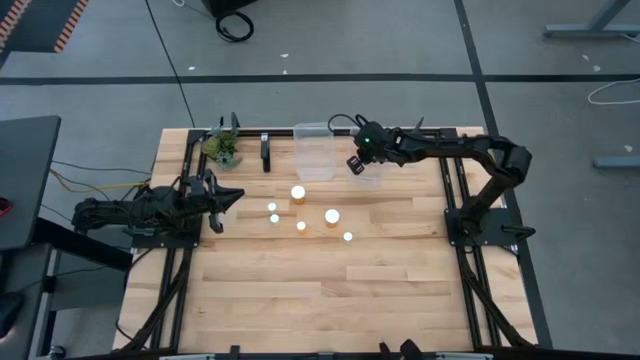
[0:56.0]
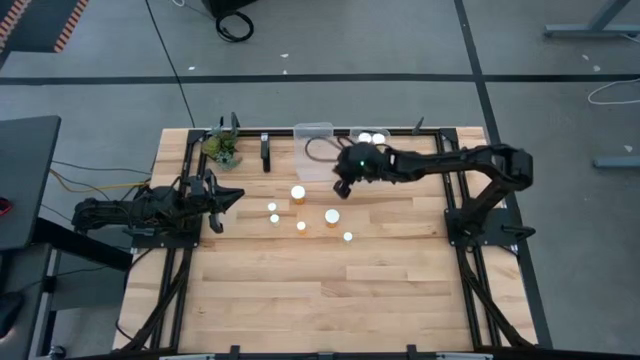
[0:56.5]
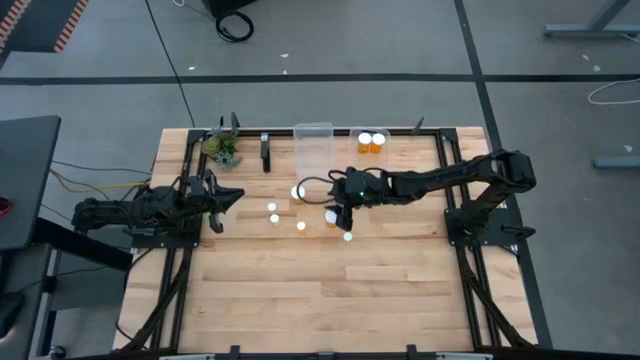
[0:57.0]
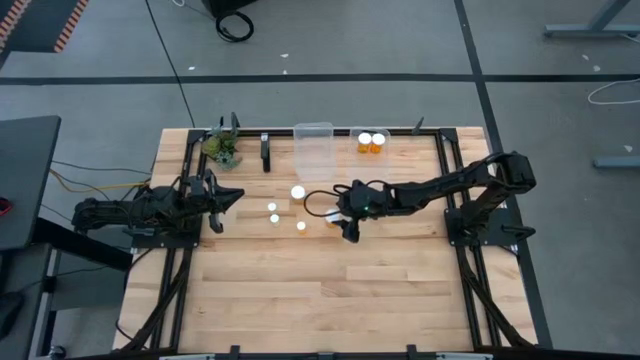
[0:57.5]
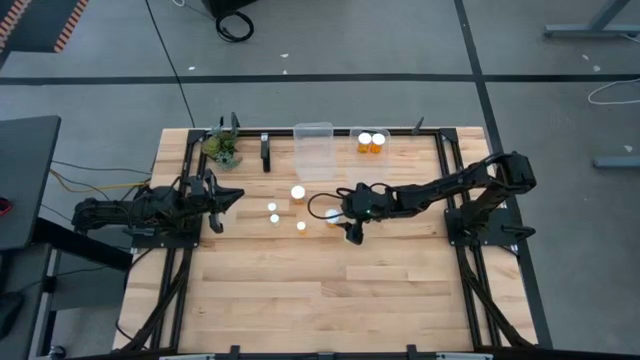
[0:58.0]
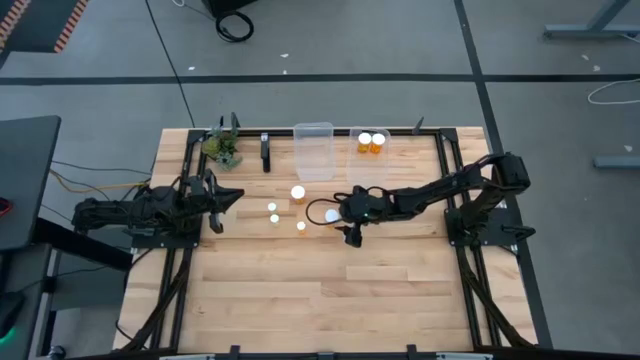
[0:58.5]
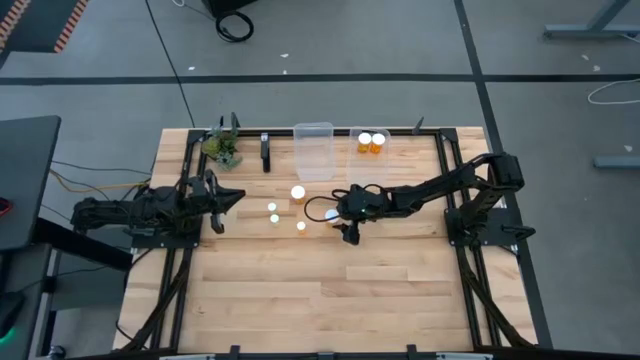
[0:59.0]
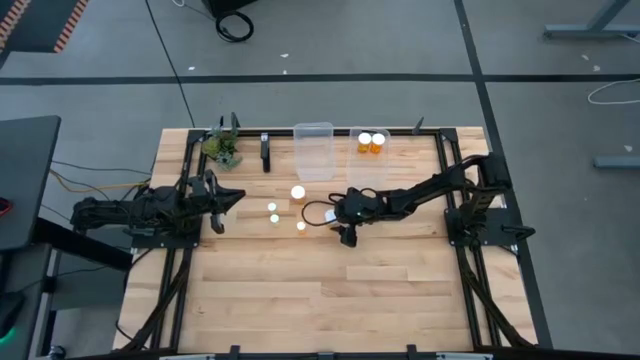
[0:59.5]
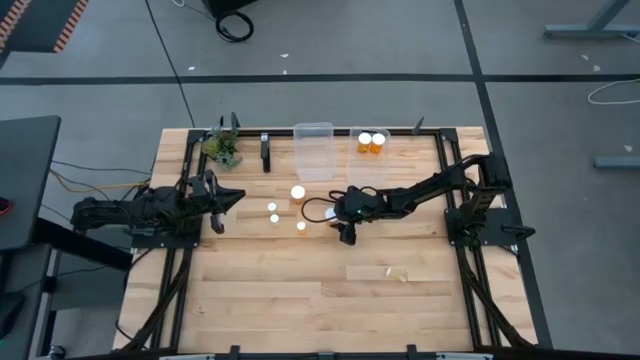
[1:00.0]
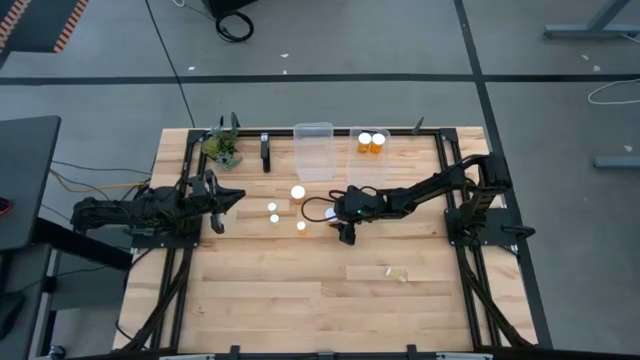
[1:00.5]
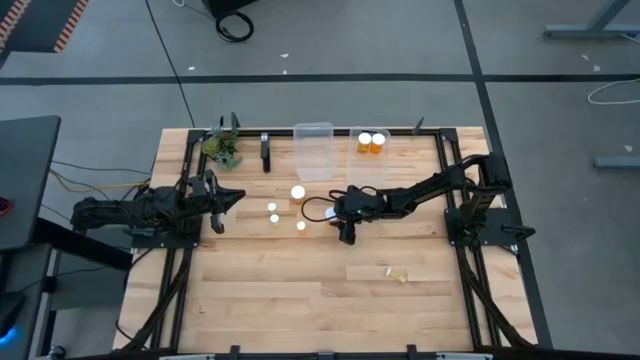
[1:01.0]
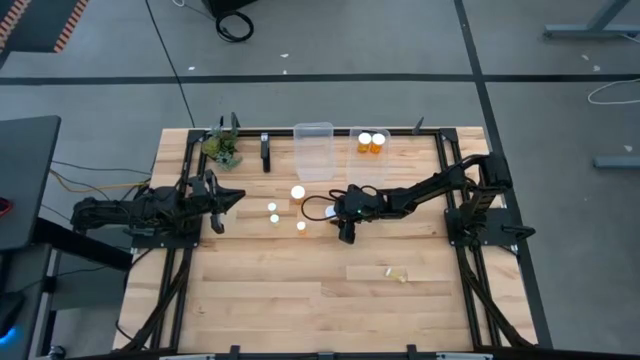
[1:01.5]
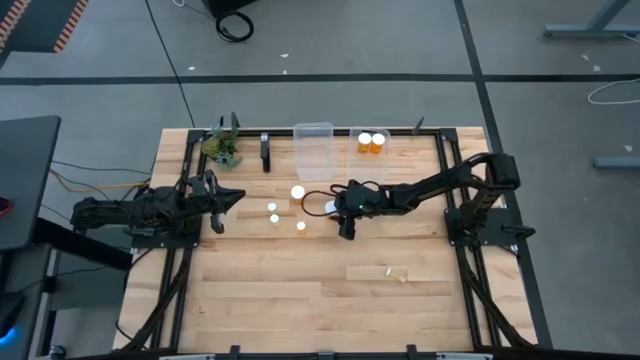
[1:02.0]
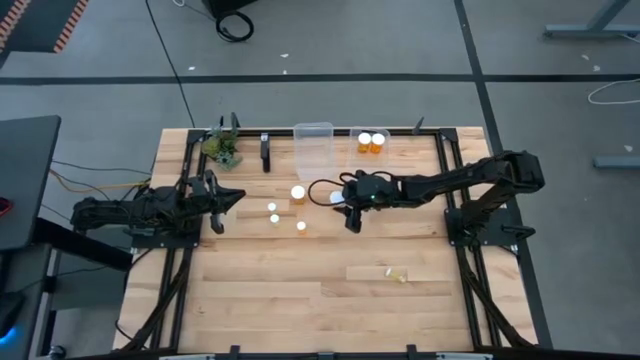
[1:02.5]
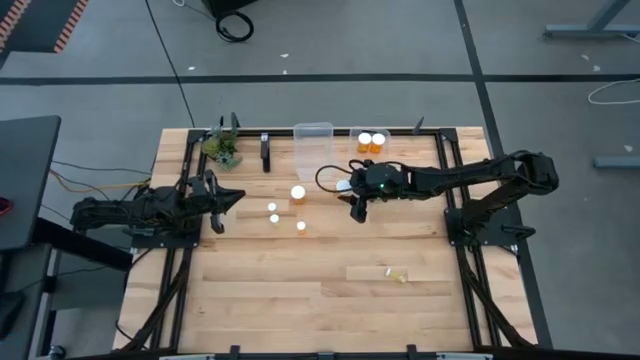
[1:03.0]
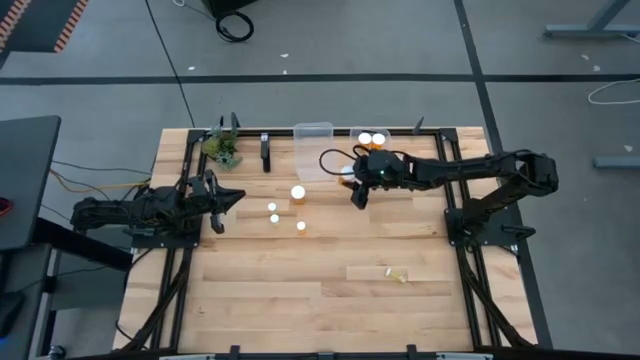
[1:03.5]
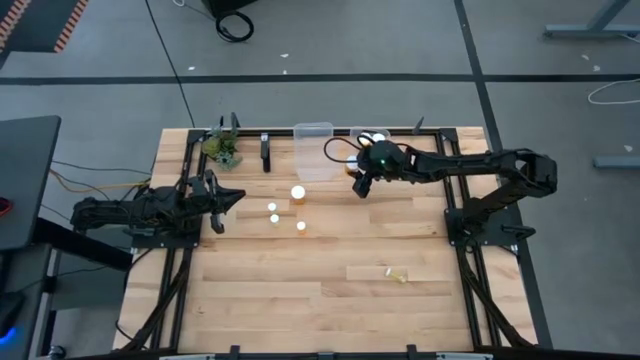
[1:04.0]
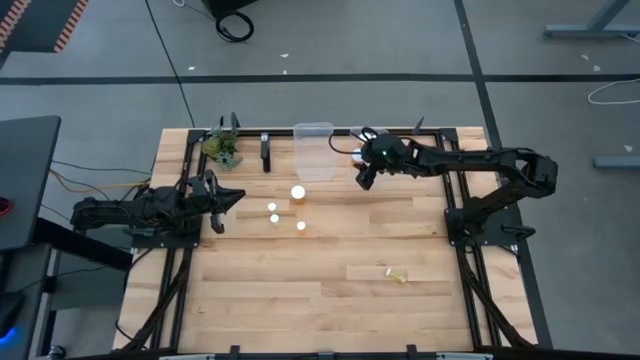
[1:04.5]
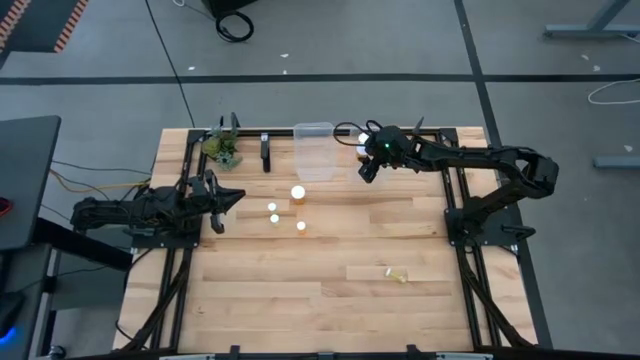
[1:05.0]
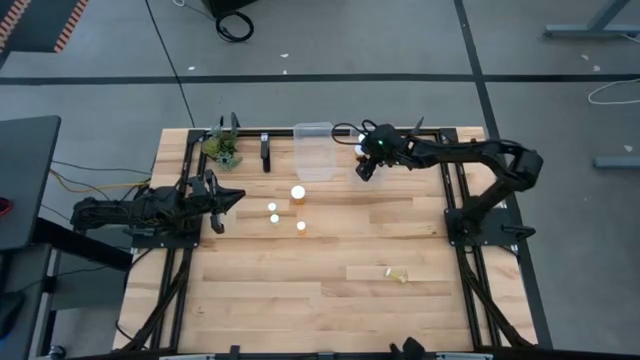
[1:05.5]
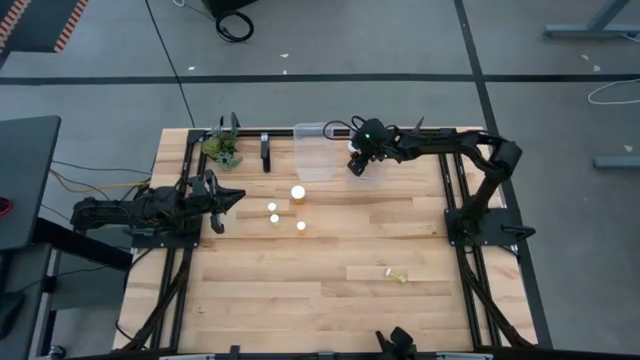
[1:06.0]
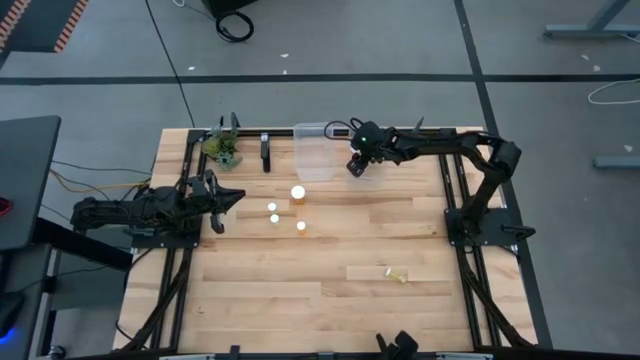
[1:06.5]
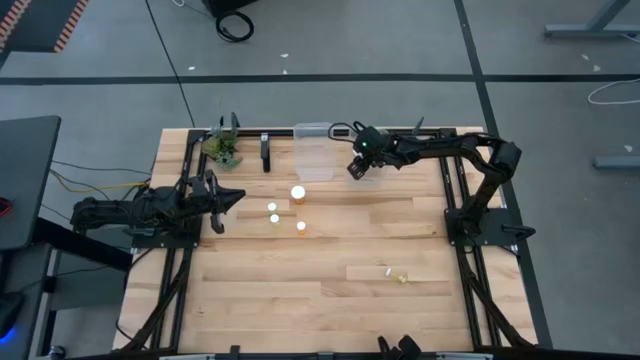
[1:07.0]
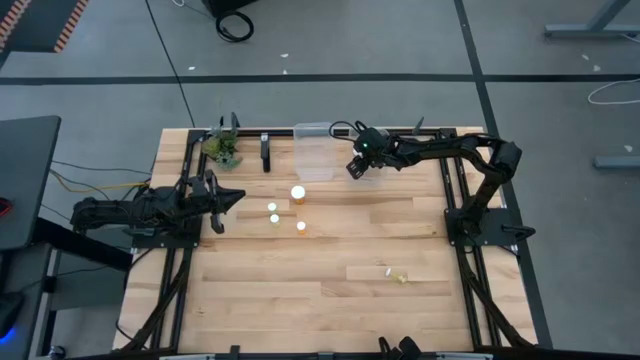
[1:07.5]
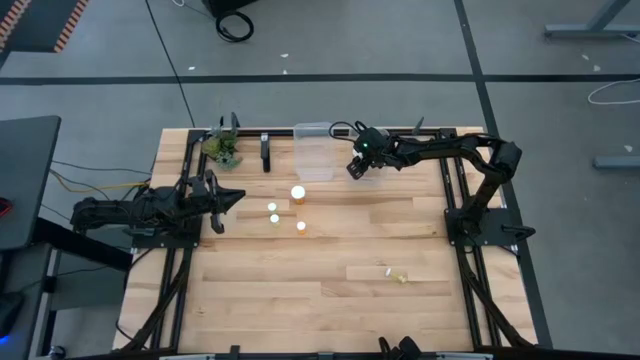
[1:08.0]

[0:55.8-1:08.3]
Task: Pick and place medicine bottles into bin by pill shape (circle, oval)
Put the bottom big orange pill into the right transparent bin

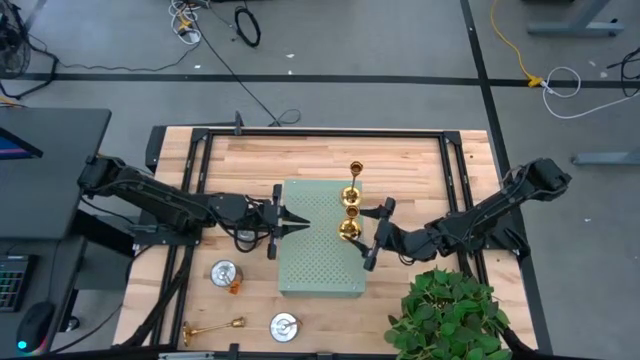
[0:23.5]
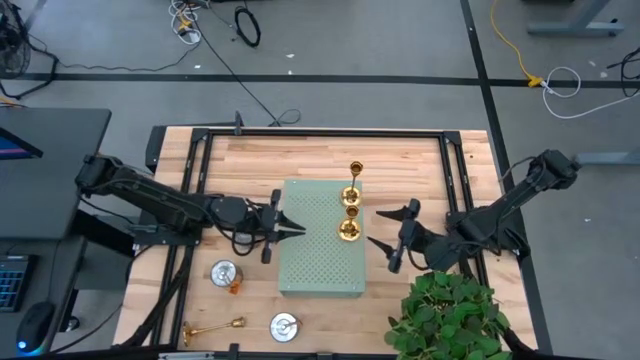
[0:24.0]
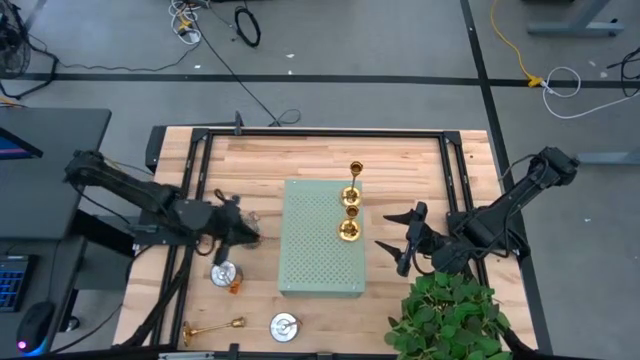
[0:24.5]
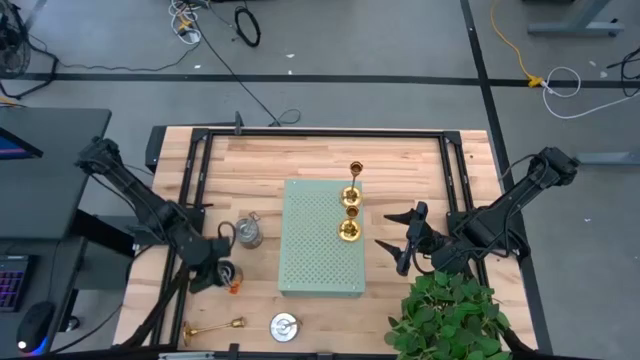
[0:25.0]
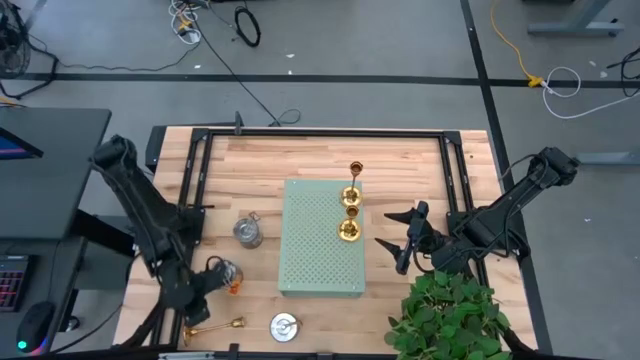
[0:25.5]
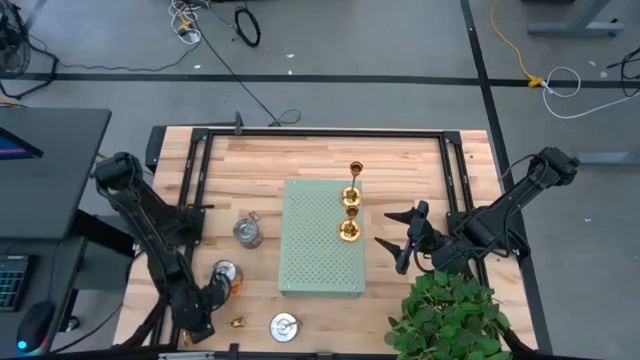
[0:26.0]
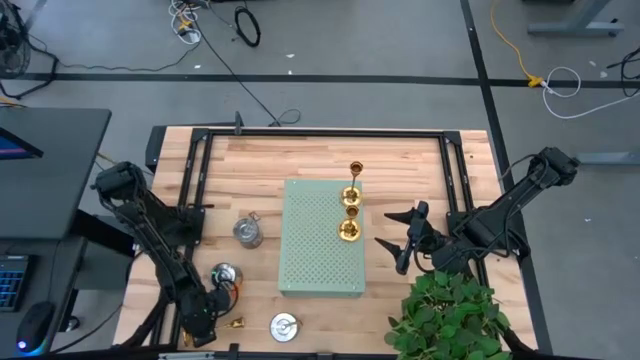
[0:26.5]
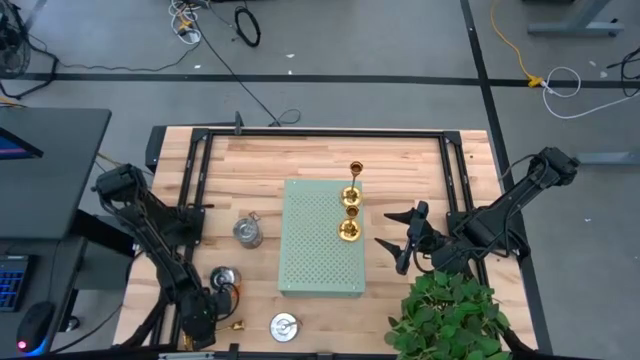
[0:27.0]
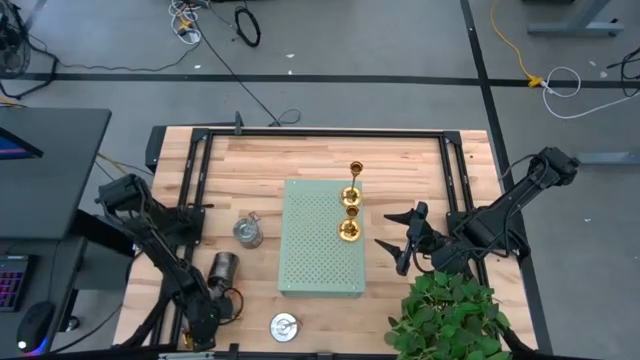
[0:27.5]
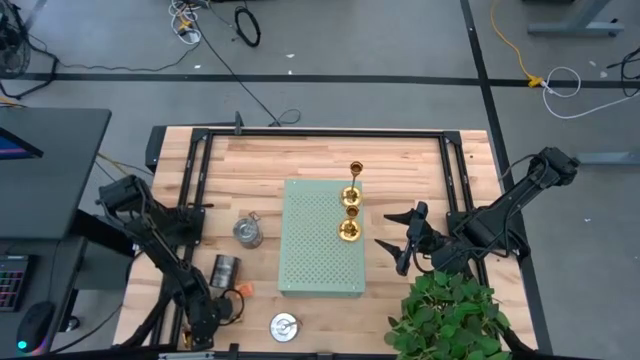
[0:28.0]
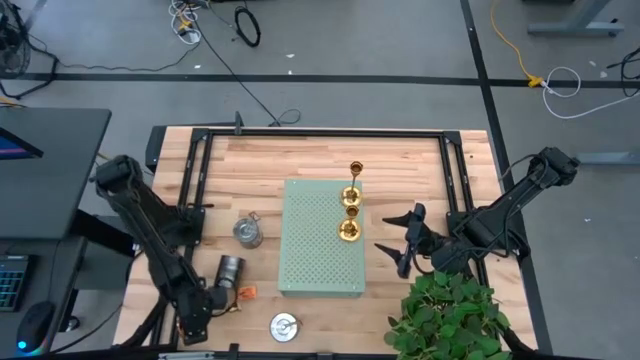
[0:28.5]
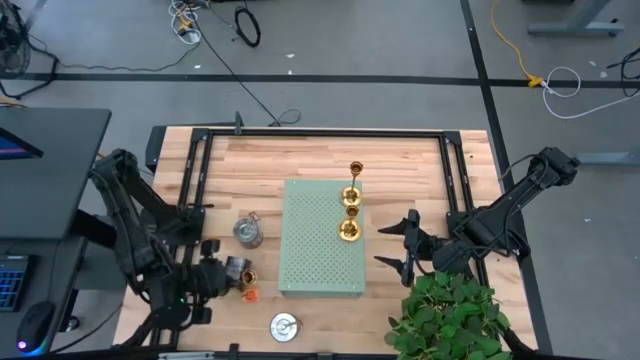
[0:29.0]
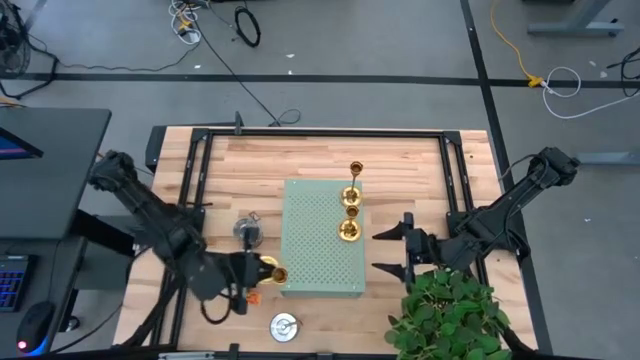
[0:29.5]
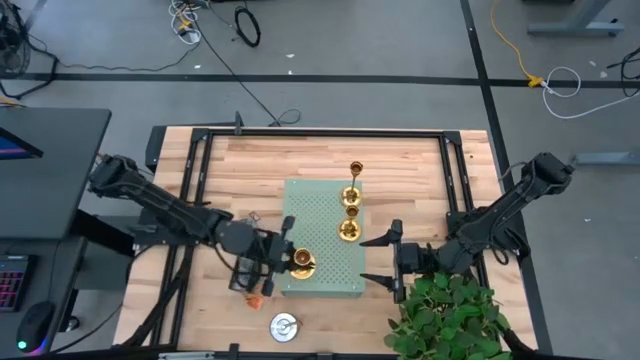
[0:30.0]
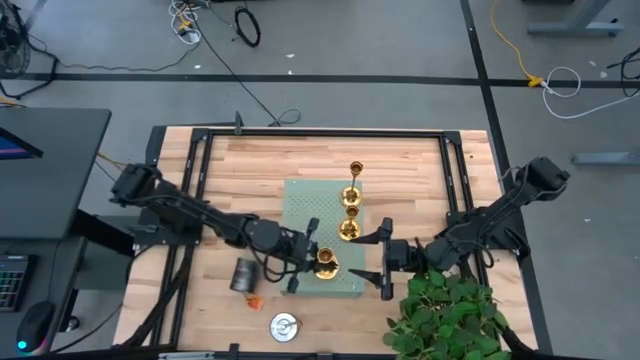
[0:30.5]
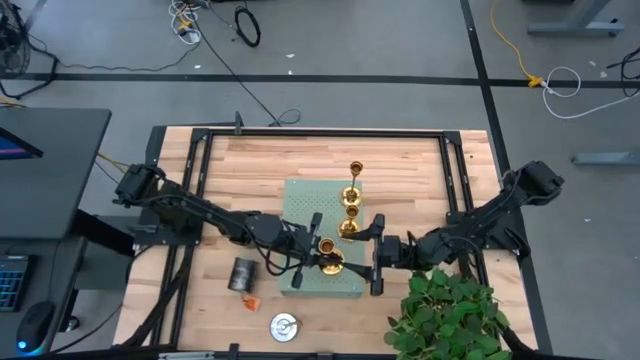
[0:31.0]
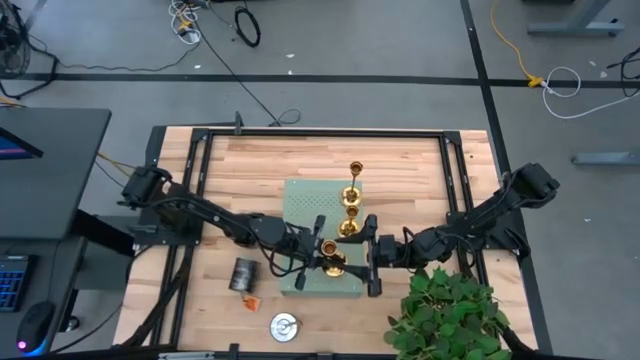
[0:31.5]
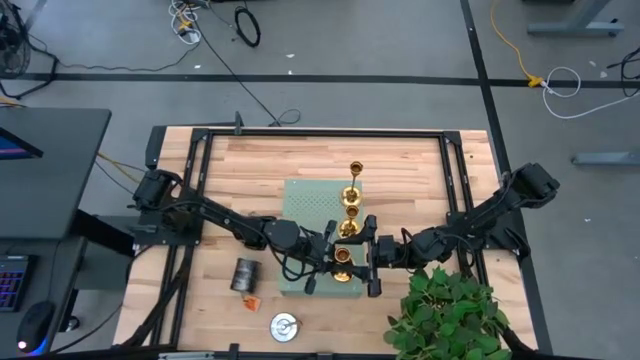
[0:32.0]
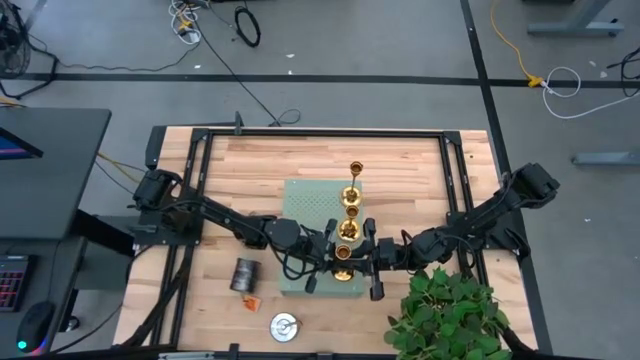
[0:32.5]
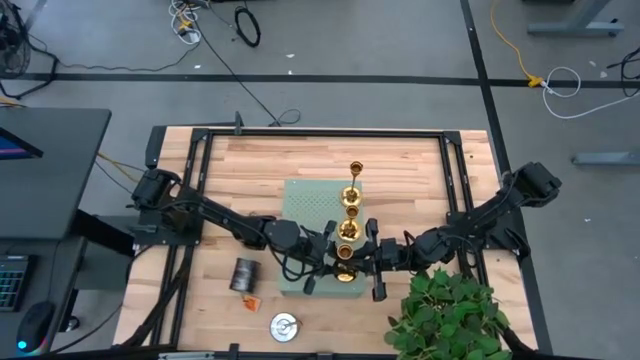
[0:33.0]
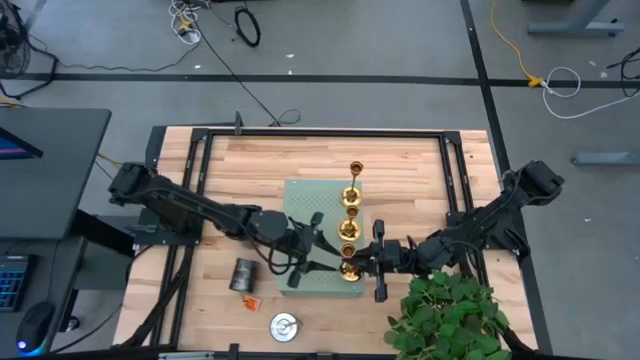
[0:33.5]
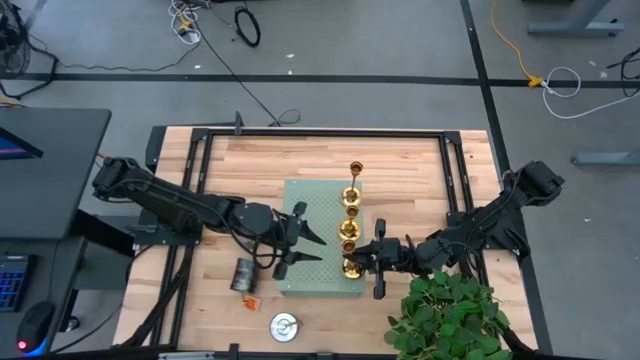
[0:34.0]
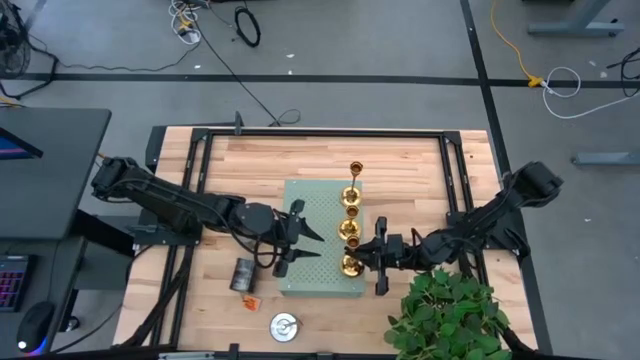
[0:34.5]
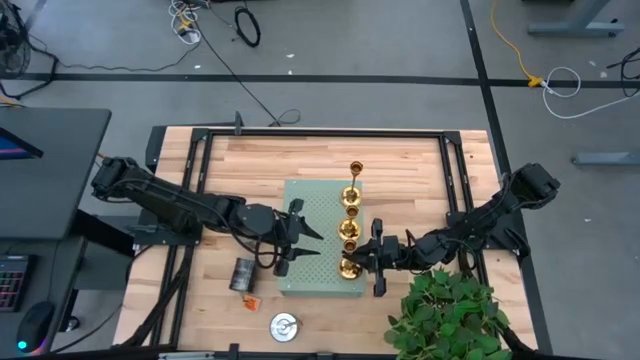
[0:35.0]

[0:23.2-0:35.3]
Task: Pick & Place candle stick holders
Align the short gold candle holder with the other short gold candle holder on the shelf
